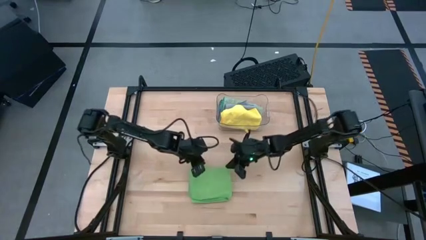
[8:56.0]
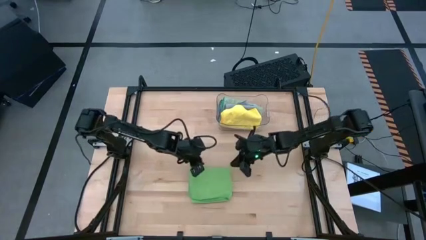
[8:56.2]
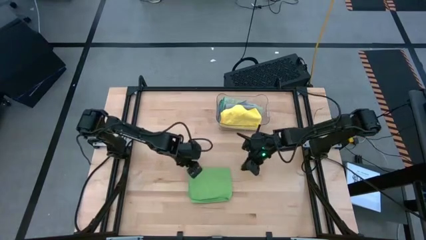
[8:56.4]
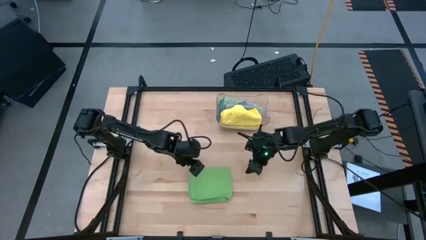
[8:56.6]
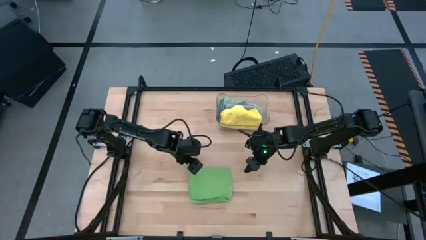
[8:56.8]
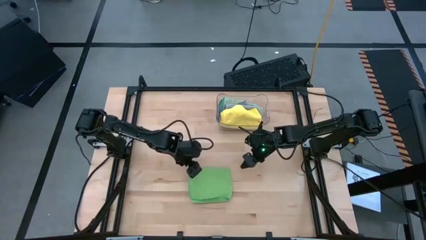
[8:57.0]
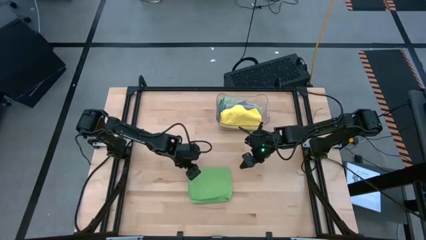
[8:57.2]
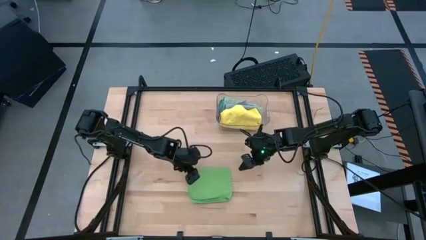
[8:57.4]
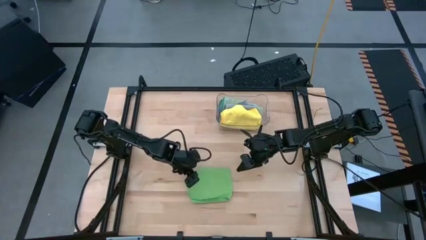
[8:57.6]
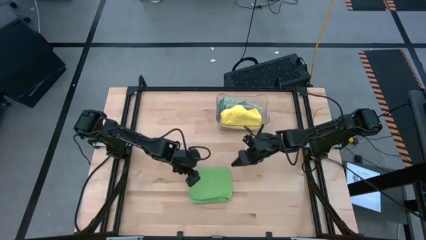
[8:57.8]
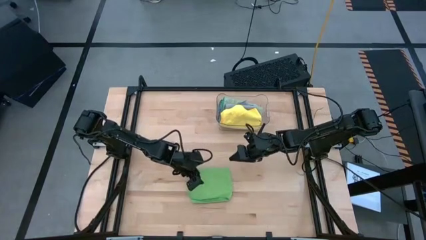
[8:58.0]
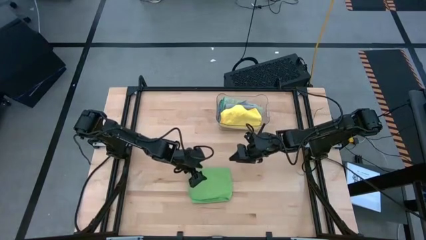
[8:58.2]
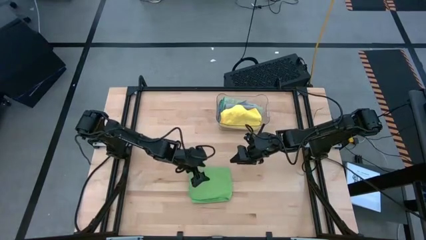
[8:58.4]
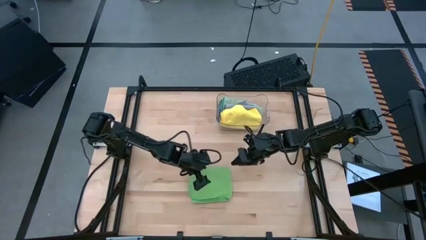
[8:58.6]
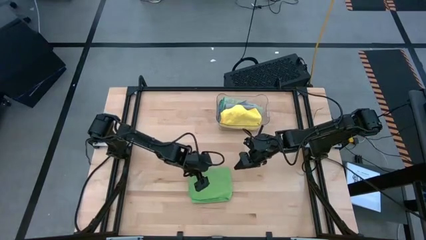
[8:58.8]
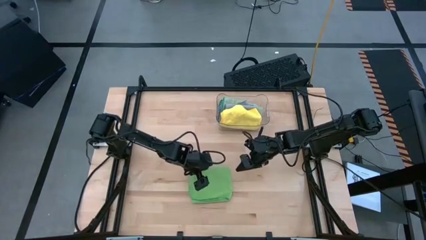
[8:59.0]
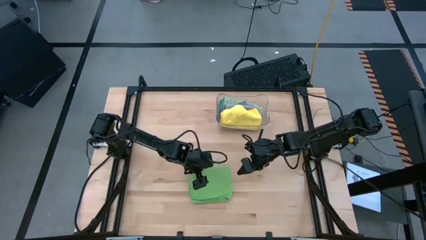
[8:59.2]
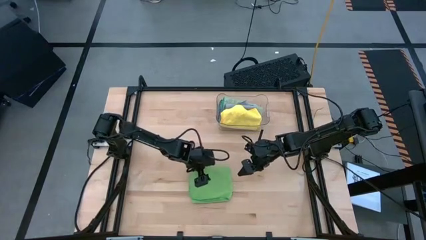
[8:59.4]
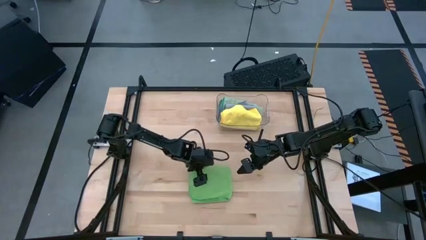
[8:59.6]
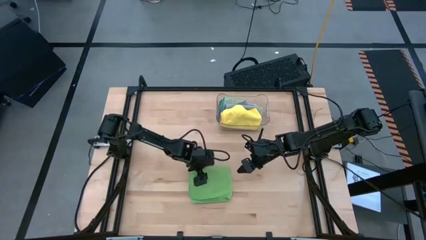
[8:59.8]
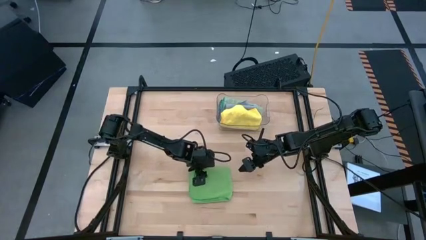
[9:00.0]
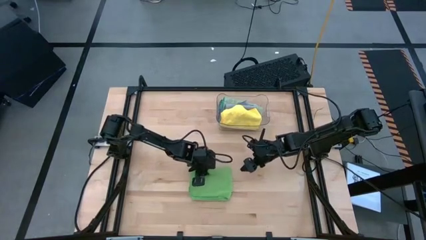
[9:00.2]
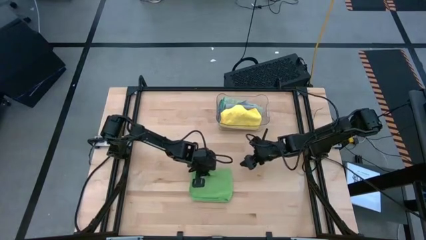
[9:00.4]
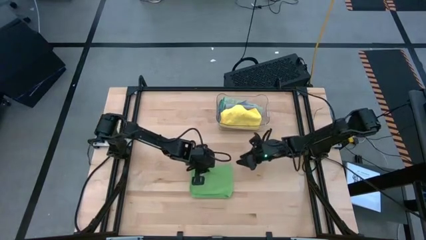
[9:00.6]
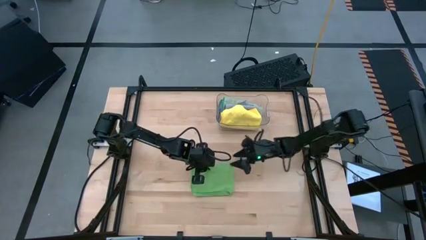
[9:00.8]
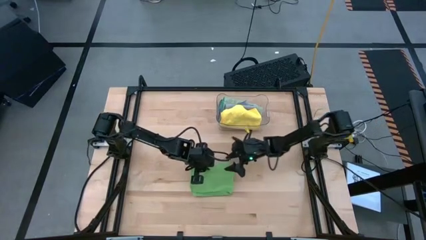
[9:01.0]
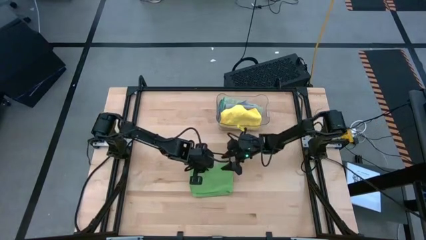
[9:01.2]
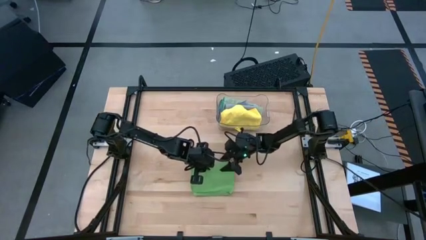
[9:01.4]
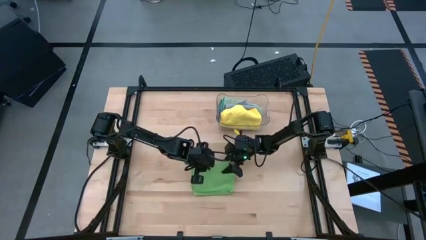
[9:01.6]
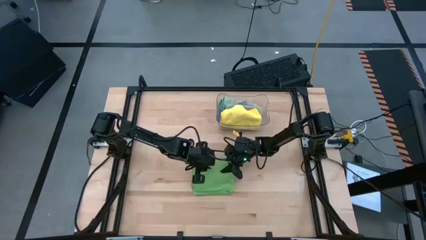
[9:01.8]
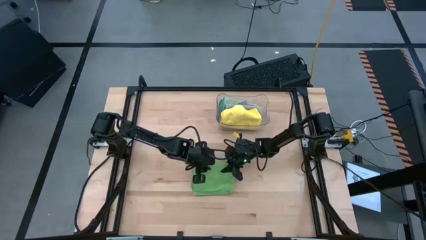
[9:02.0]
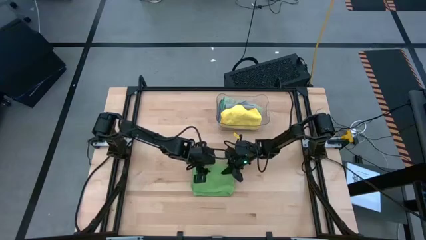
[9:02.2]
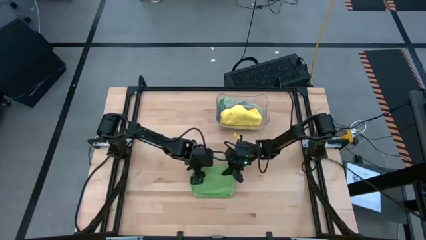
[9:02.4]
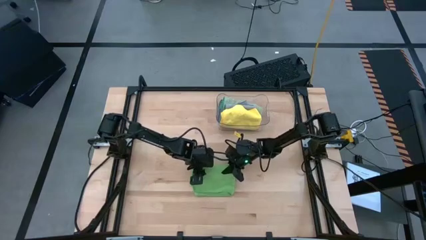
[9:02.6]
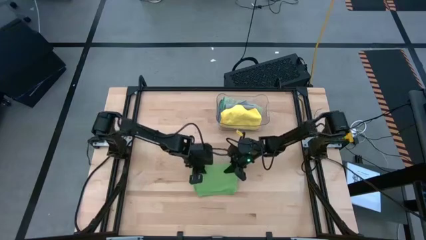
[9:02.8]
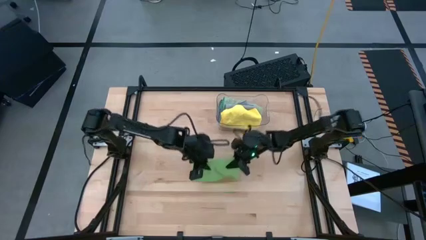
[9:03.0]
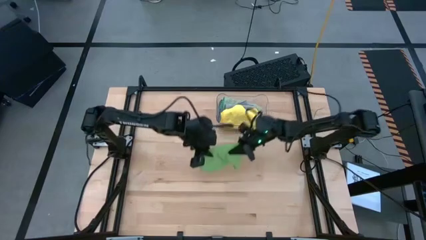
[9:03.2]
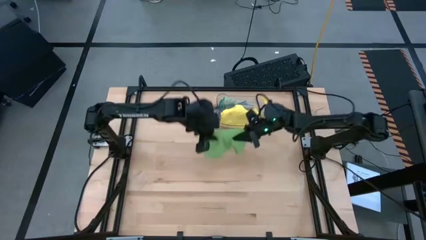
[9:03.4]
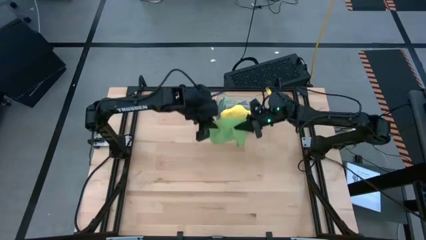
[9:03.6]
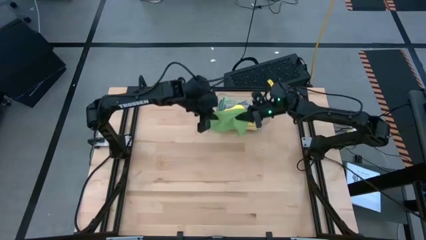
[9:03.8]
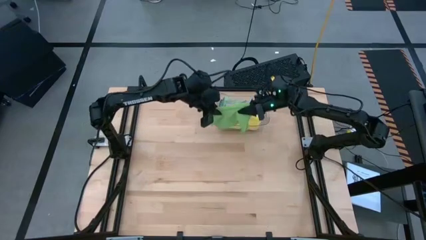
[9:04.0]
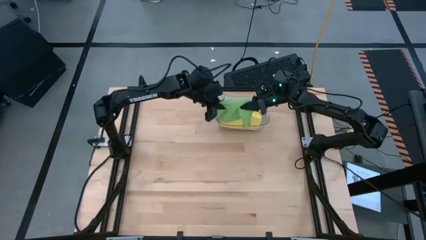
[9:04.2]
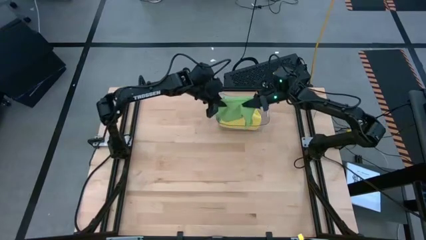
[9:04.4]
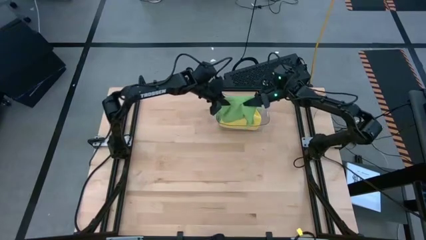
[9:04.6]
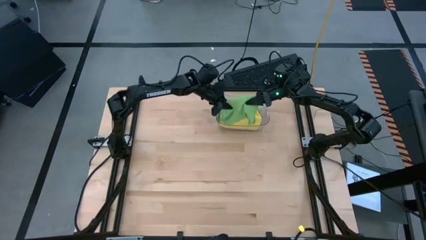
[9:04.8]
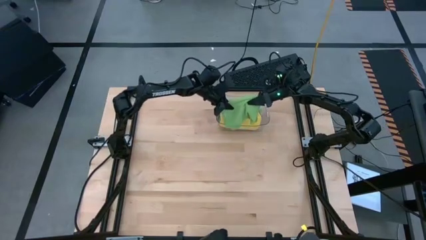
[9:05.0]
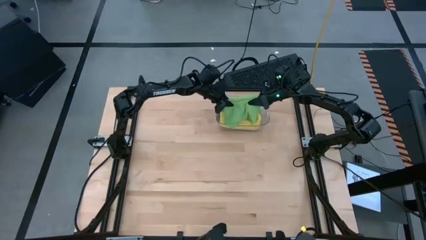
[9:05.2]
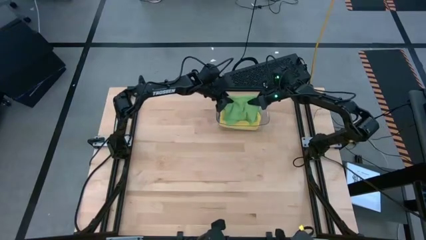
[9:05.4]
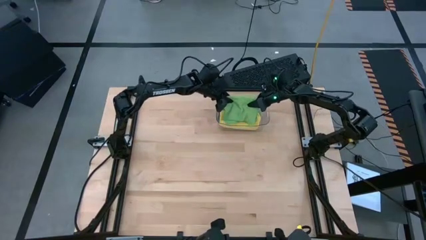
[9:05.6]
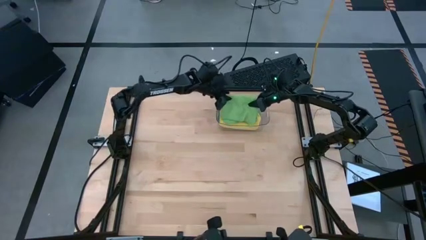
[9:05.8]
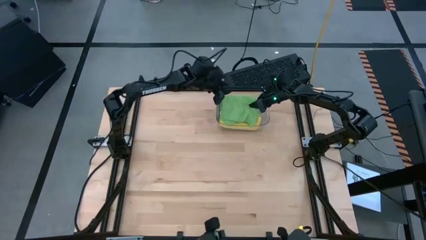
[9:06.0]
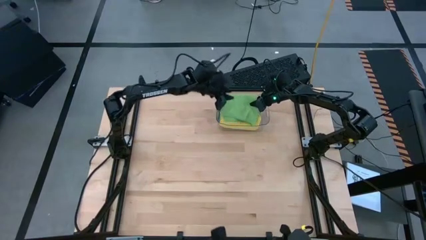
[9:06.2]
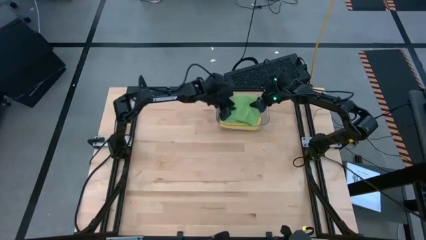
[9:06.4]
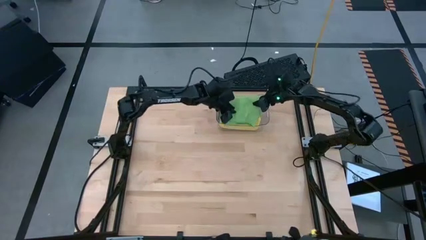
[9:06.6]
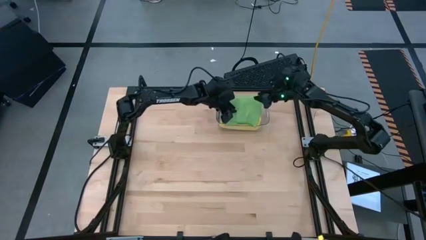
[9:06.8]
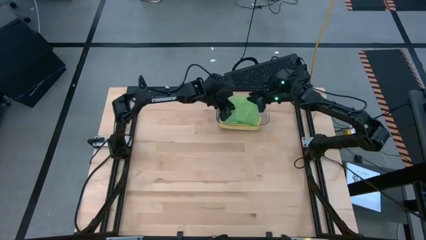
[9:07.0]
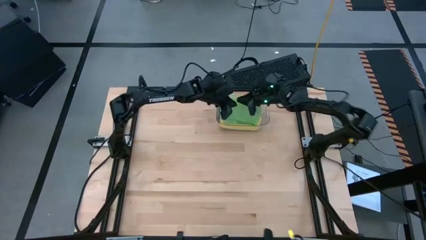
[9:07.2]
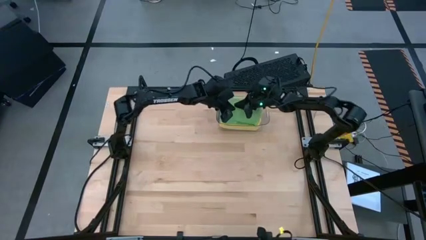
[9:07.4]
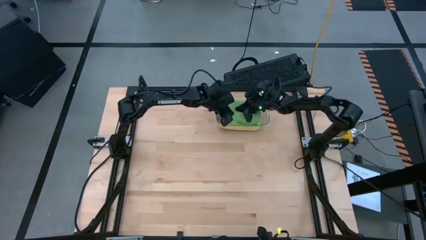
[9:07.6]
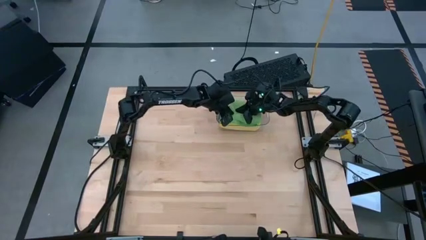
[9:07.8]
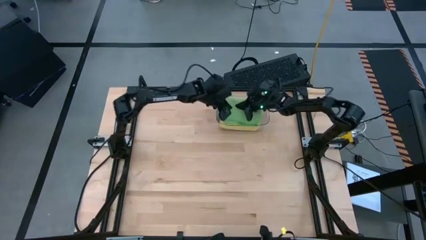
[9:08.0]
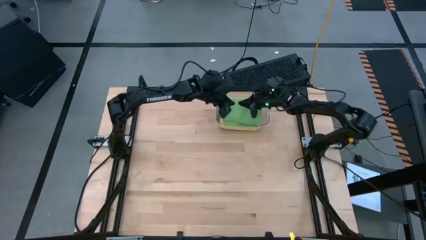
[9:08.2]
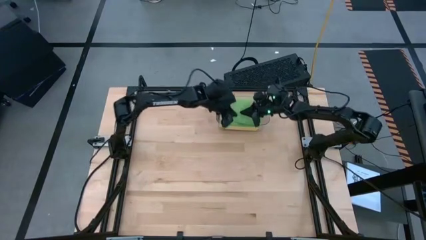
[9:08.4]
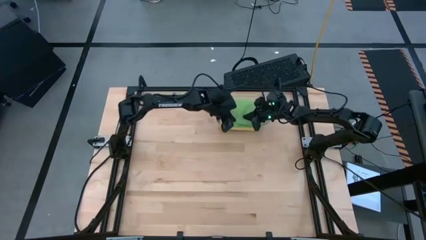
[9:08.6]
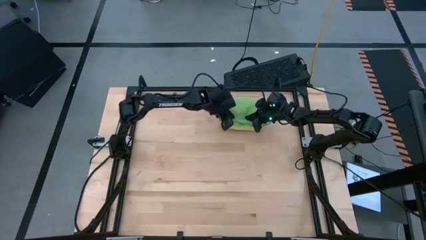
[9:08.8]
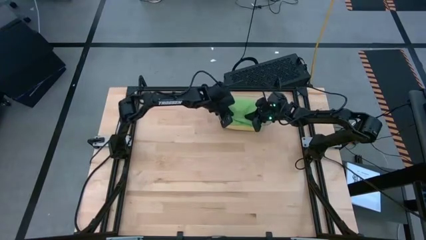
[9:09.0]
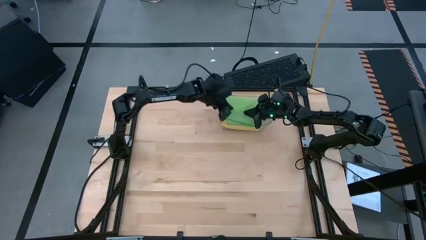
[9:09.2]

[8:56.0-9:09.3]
Task: Fold microfiber towels
Put the green towel in the transparent bin

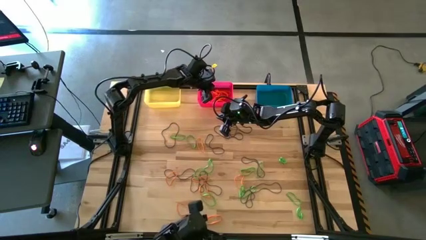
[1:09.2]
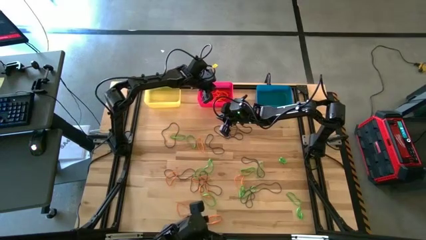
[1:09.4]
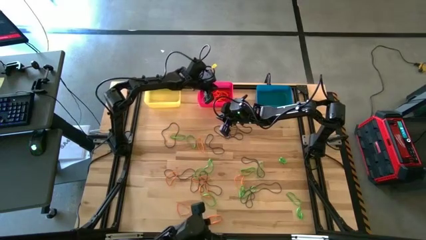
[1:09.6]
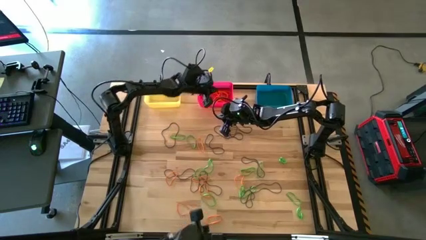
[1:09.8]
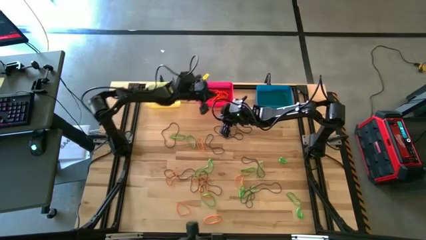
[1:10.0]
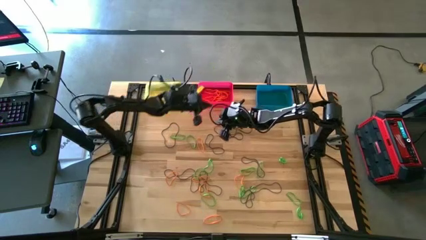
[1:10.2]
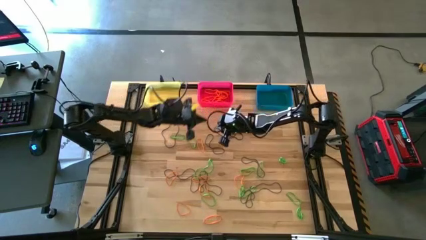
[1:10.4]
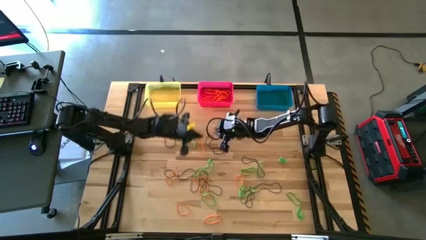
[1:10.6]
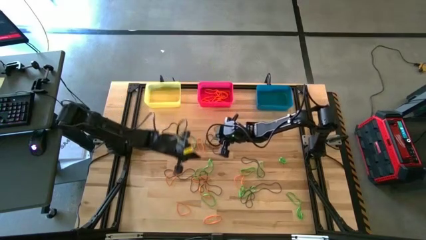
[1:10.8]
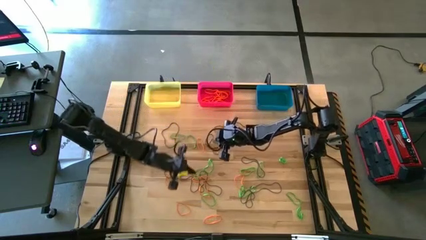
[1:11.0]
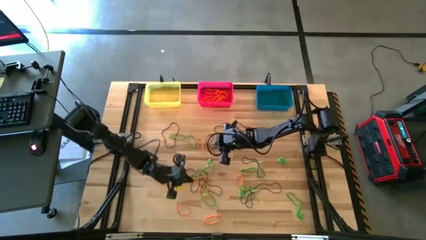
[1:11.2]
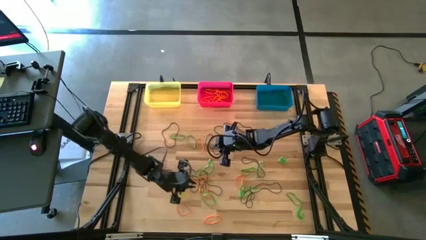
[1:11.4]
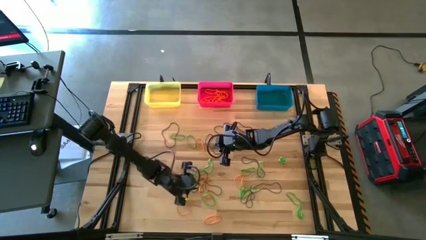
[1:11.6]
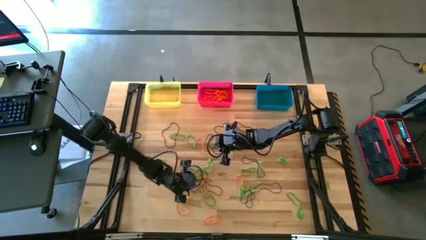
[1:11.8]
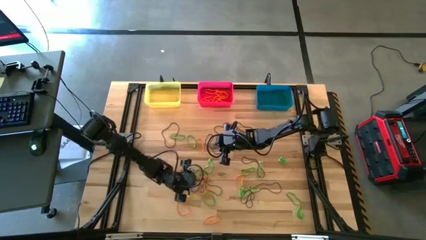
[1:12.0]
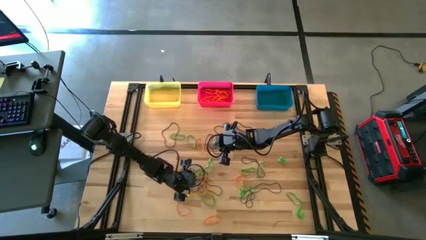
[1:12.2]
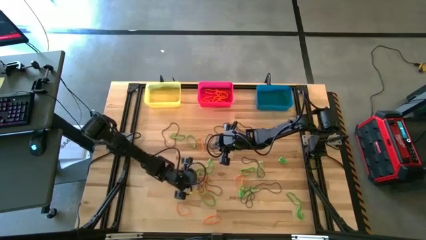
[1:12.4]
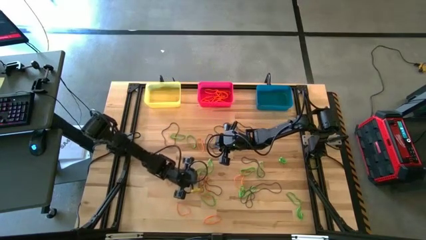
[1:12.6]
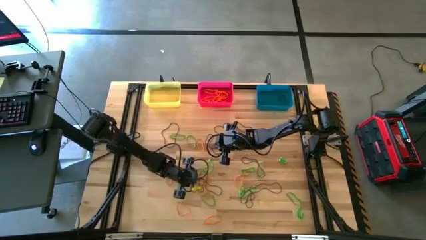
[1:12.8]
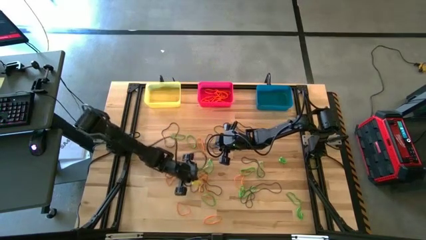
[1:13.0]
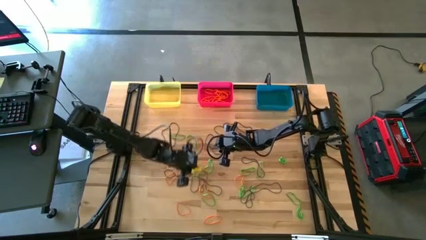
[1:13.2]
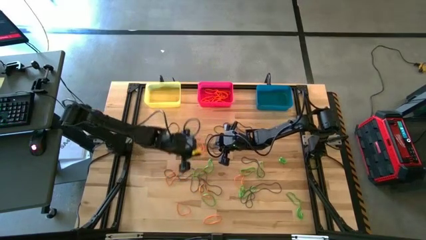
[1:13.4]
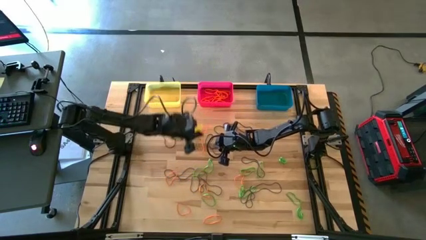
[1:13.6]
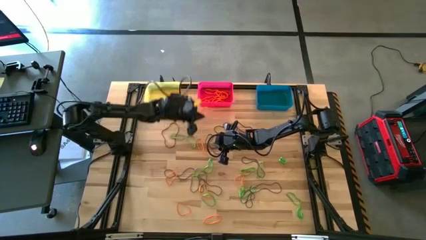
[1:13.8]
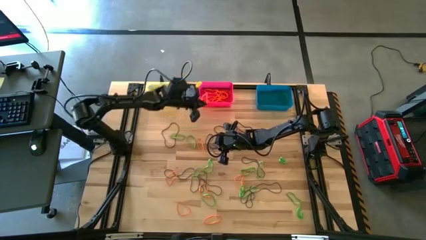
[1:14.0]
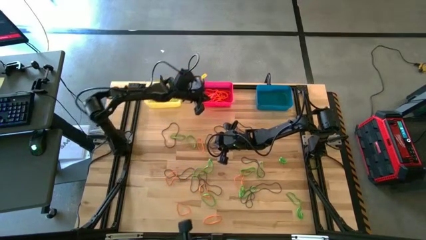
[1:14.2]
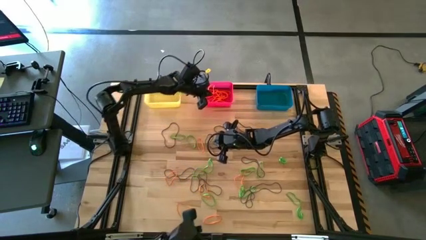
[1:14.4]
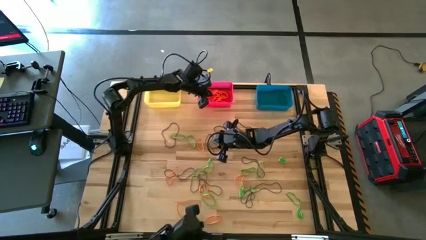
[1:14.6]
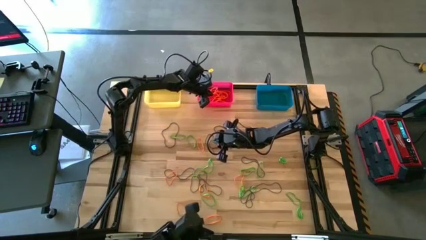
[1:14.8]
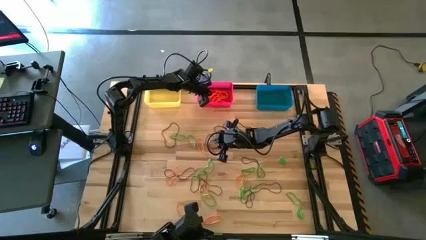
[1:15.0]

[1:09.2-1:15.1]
Task: Sort rubber bands into baskets
Put the orange rubber band into the pink bin
